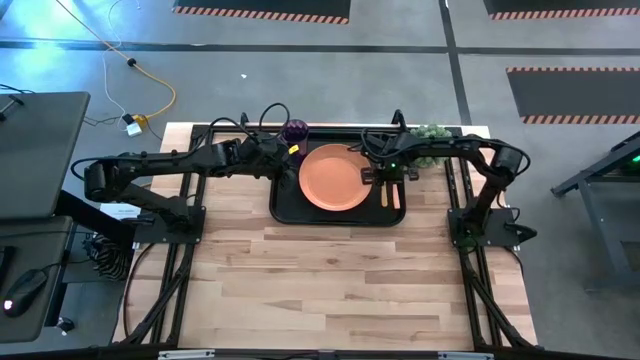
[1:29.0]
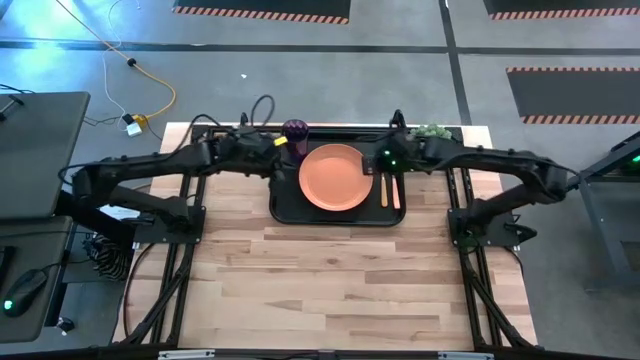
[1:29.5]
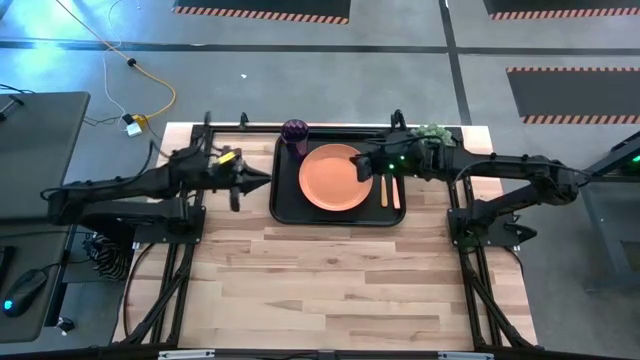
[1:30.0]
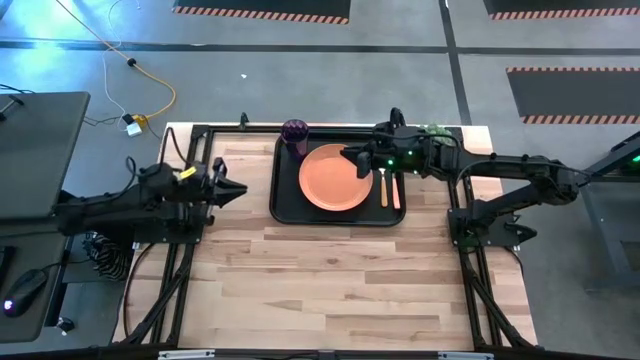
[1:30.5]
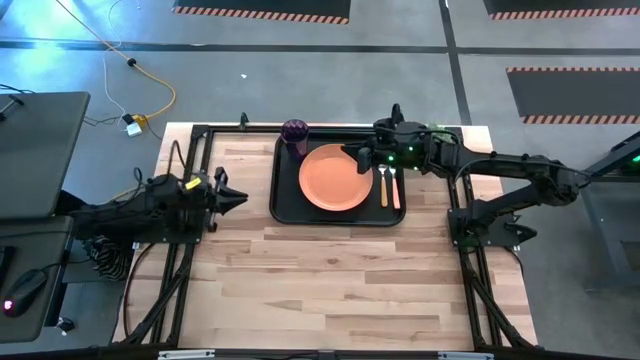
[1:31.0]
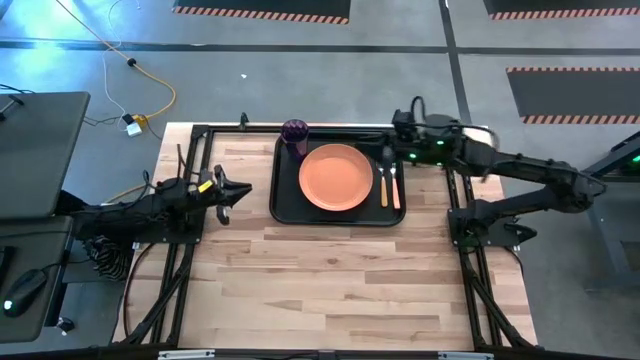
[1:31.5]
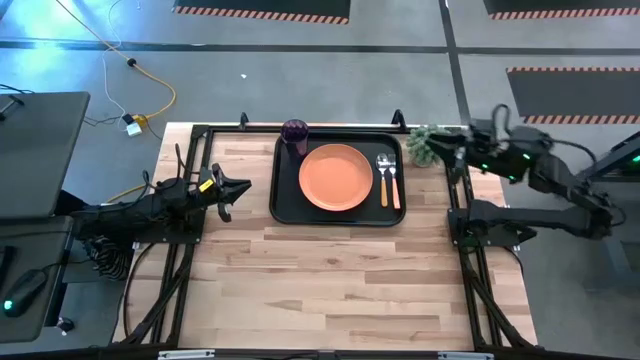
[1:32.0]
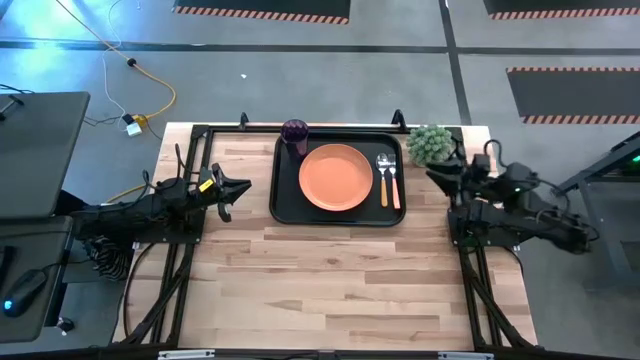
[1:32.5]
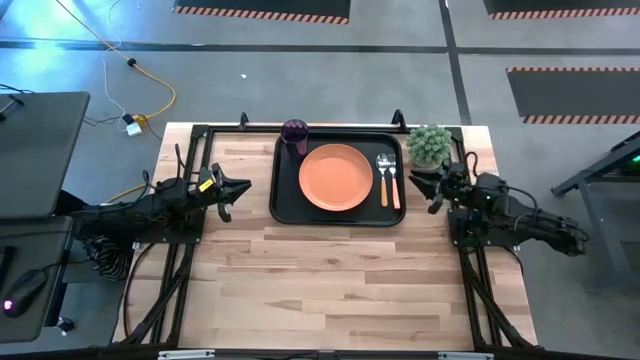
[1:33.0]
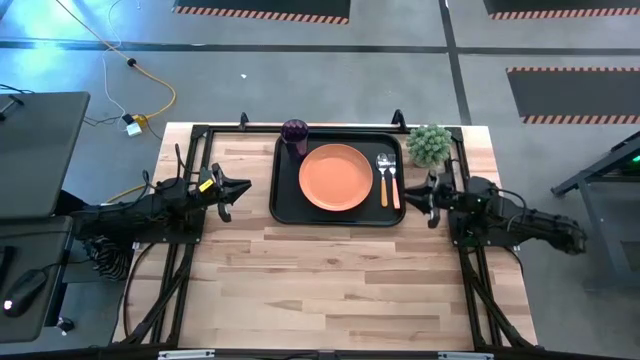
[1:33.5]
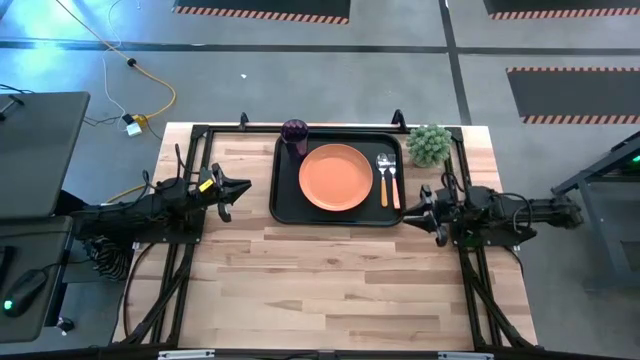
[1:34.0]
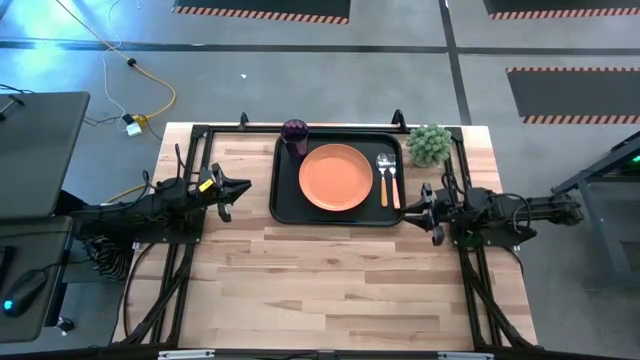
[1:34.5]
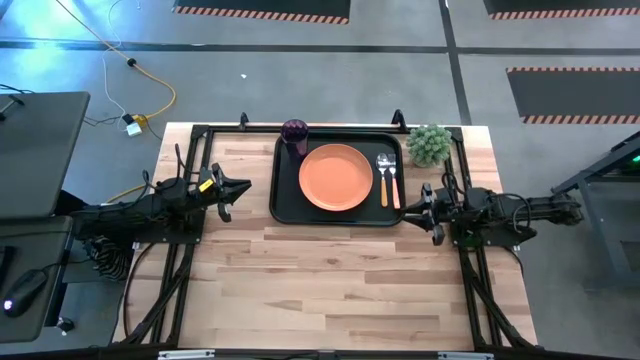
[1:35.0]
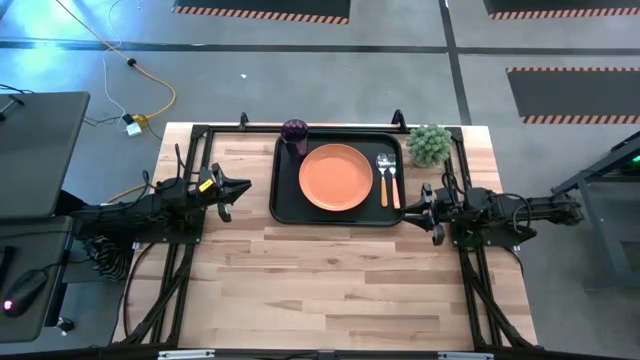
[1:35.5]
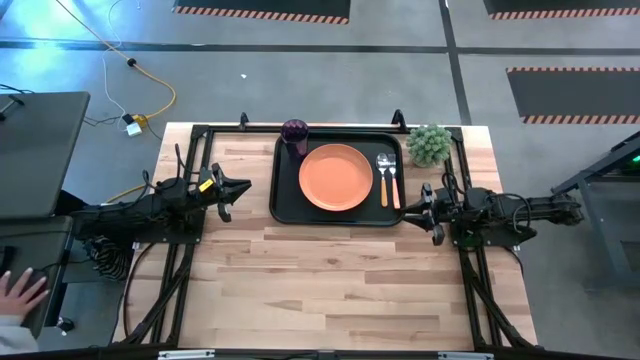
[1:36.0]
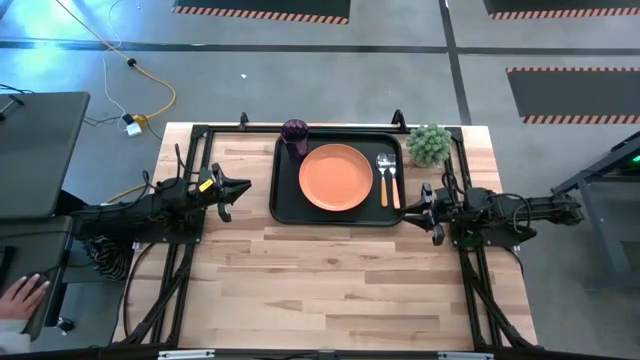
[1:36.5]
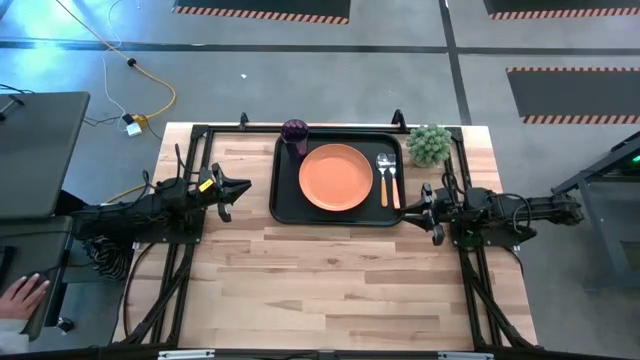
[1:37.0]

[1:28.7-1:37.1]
Task: Pick and place plate/cup/fork/spoon on tray
Return to Home Position

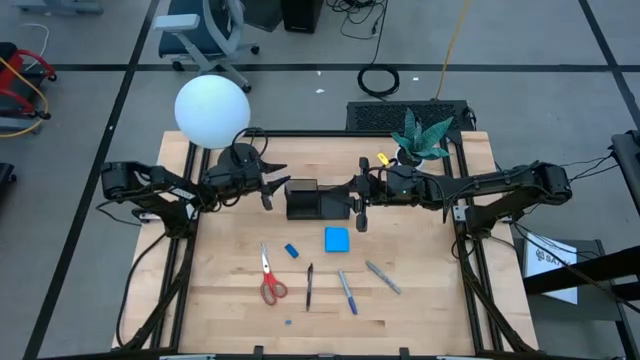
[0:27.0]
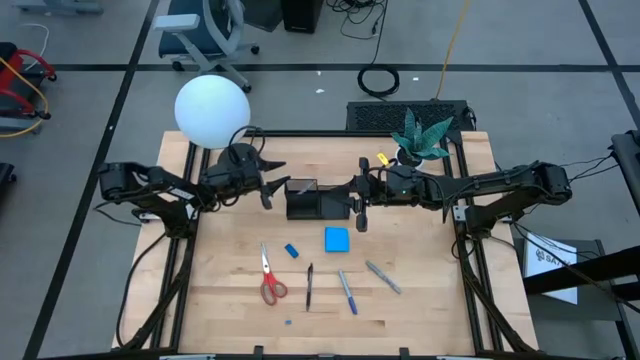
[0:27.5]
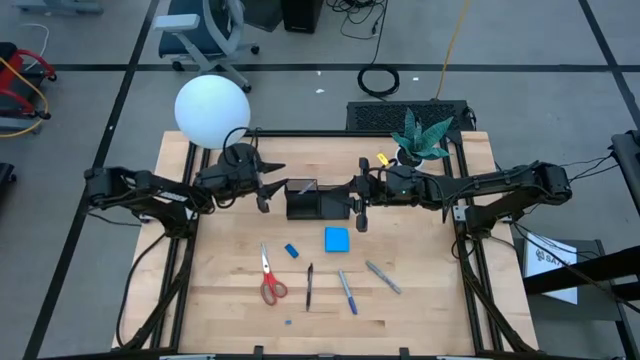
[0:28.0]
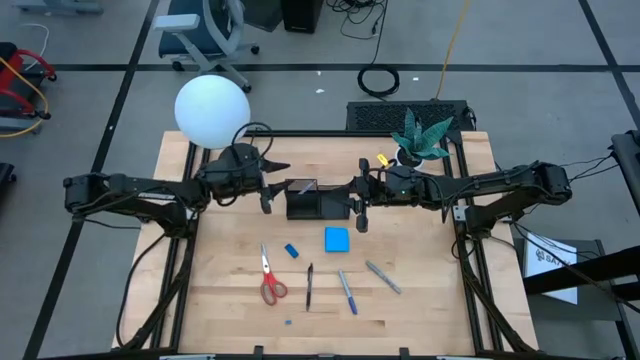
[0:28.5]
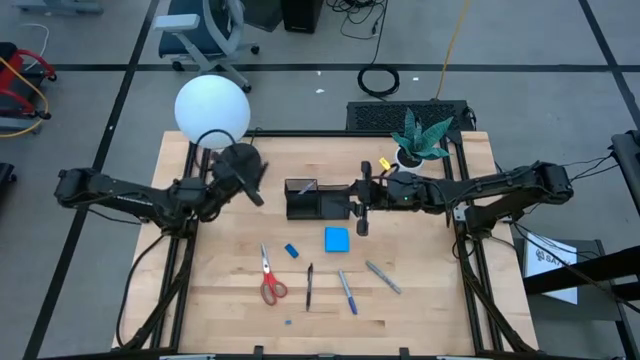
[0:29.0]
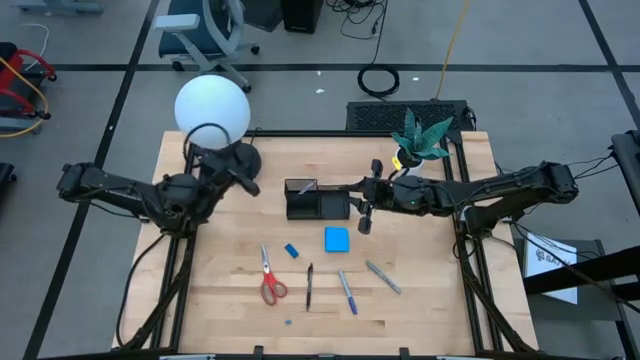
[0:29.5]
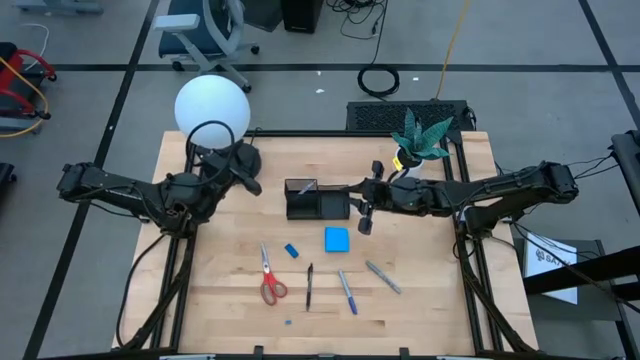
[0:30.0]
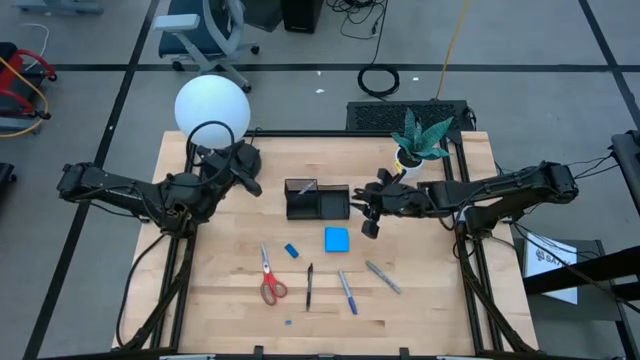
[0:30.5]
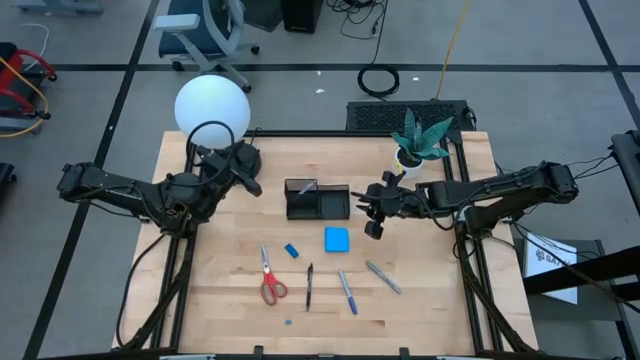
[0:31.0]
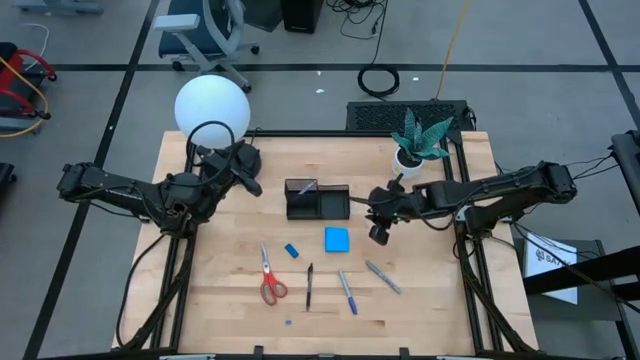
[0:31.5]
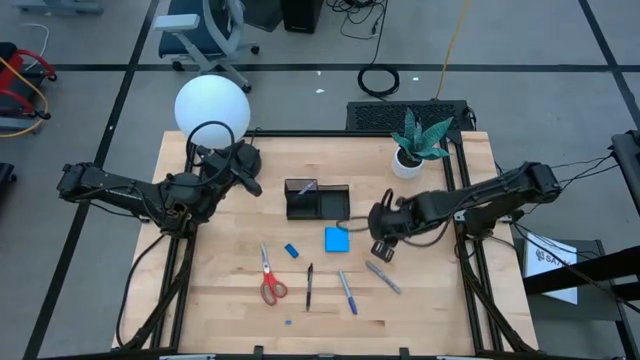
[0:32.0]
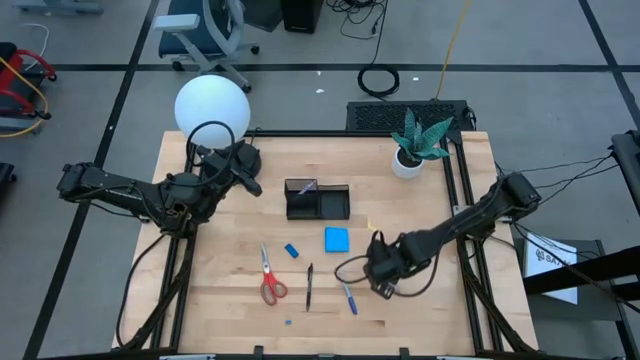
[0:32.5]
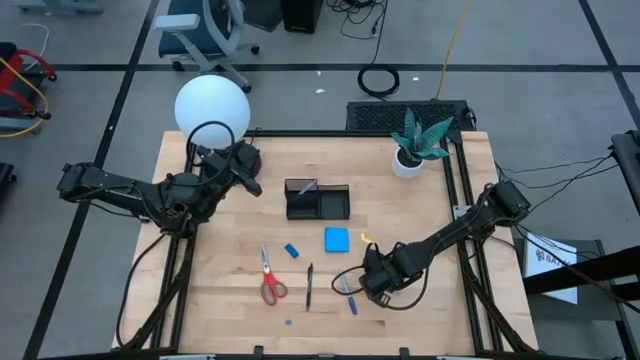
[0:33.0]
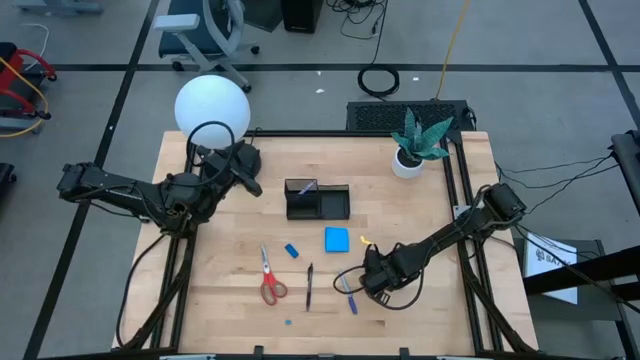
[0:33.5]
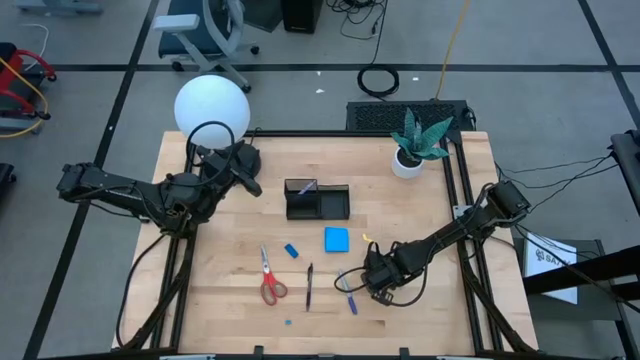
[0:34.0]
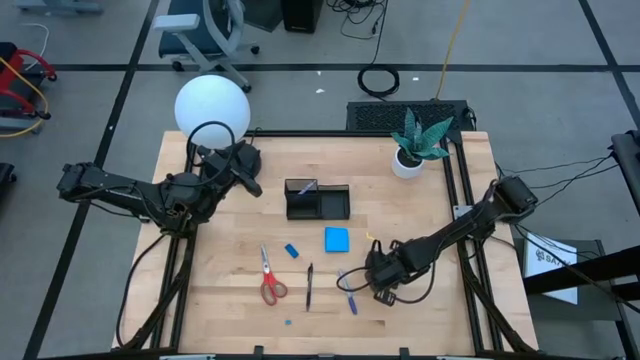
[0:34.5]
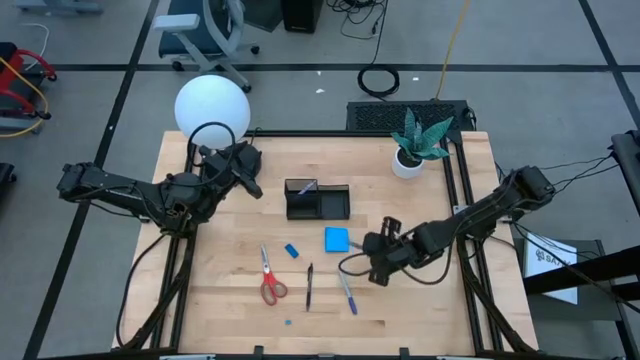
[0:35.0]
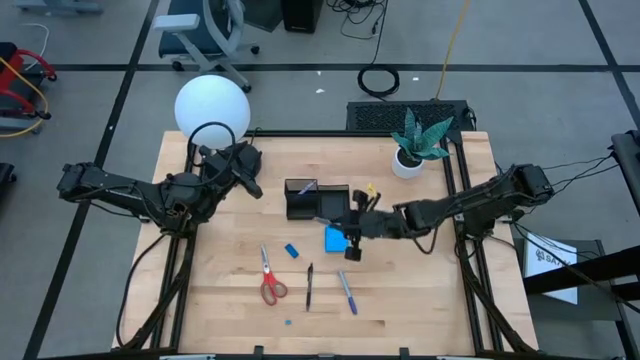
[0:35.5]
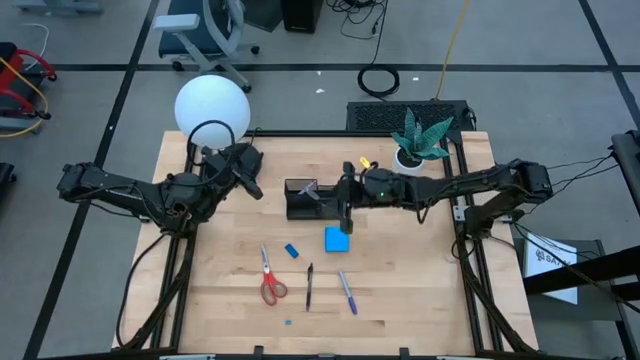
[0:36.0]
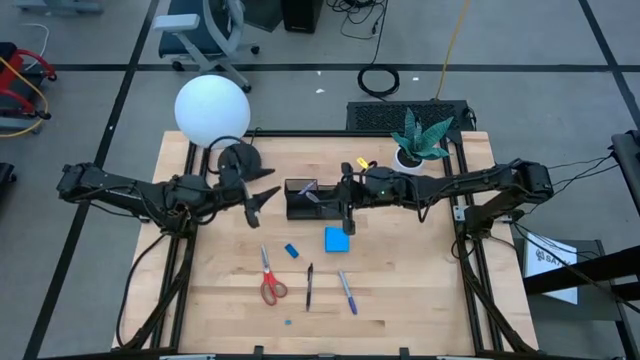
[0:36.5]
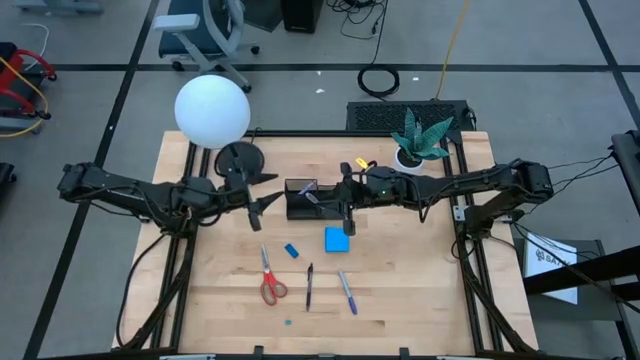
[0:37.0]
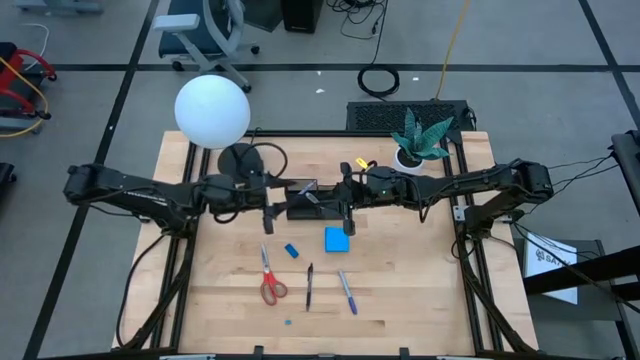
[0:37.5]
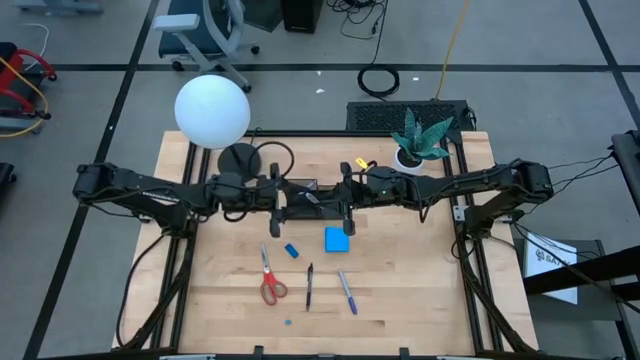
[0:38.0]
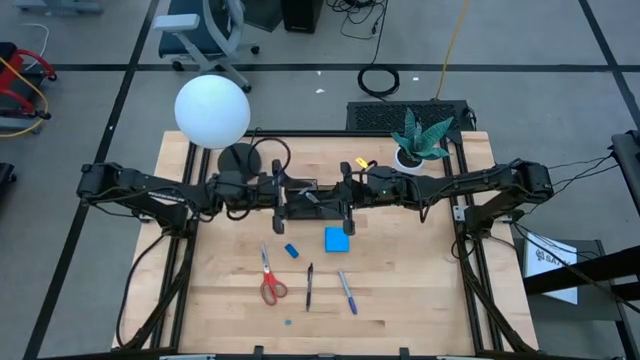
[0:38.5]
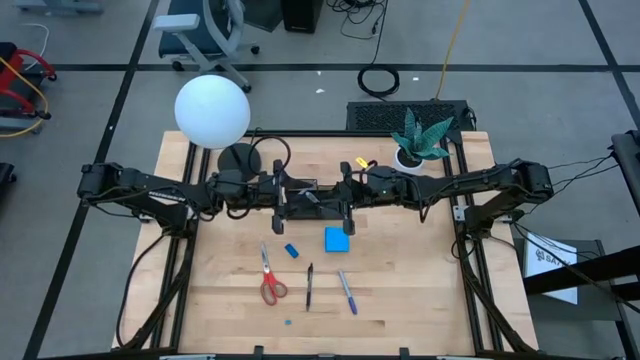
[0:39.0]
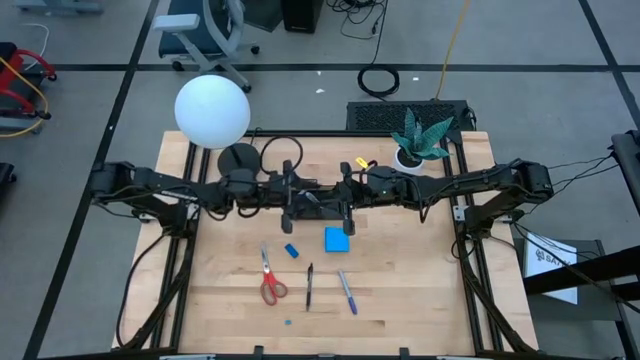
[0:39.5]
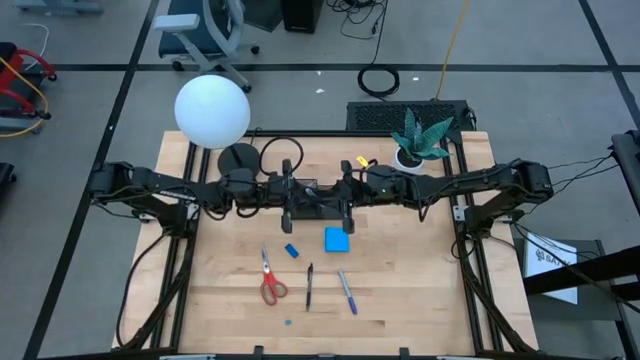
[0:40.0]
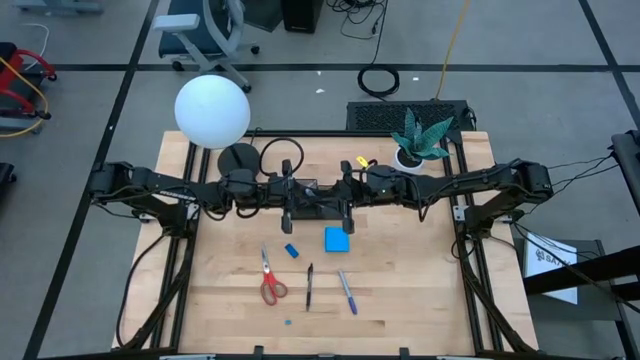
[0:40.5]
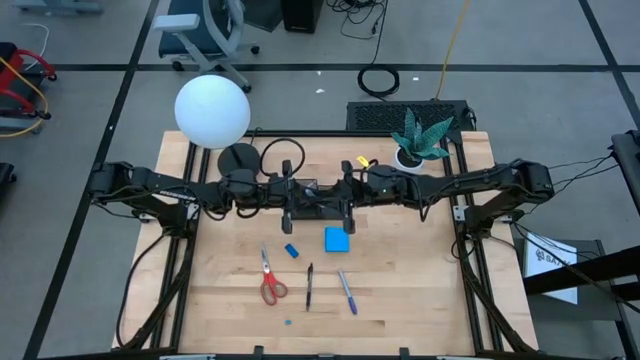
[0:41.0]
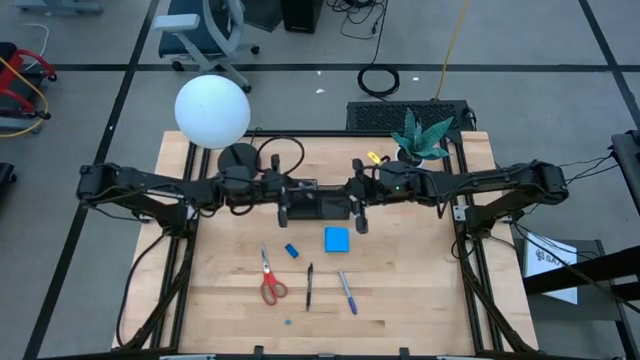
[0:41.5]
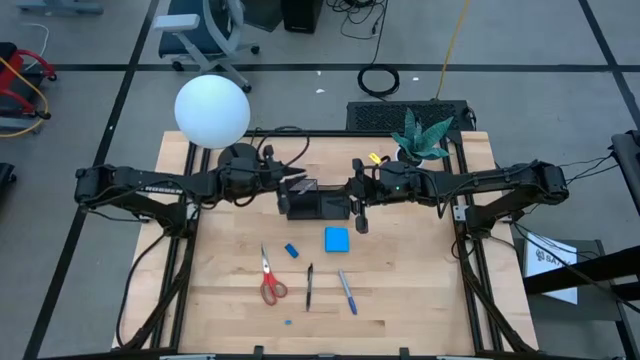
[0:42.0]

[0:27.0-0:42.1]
Task: Pick and place office supplies into organizer
Put the gray marker into the black mesh organizer
